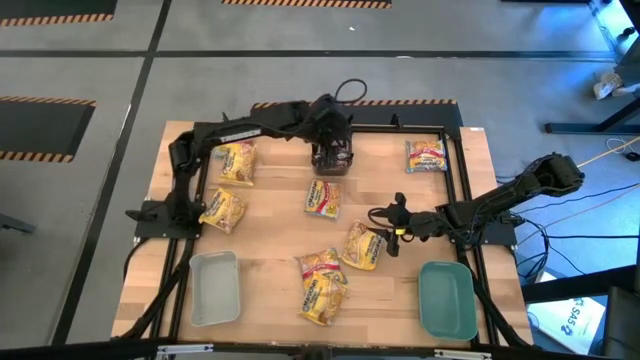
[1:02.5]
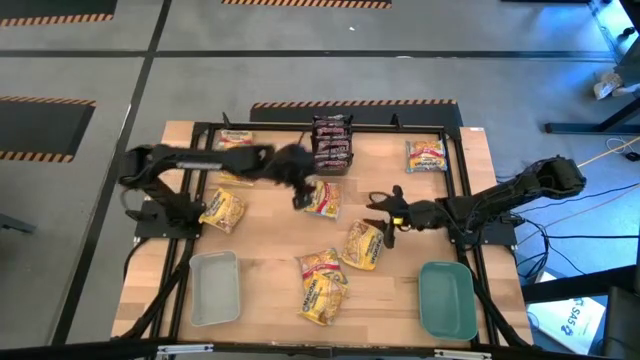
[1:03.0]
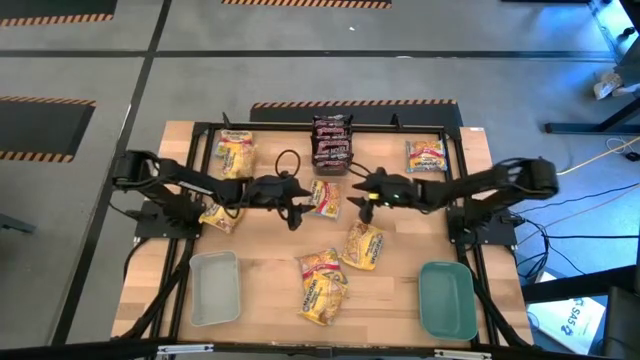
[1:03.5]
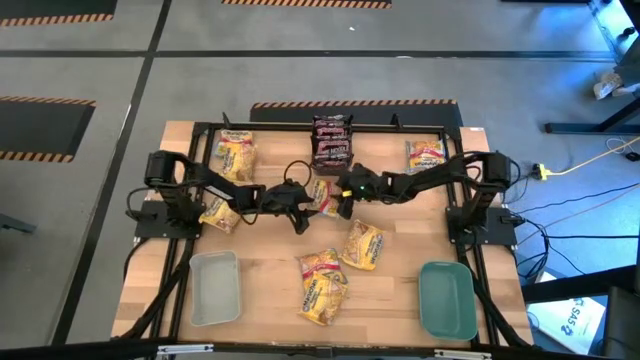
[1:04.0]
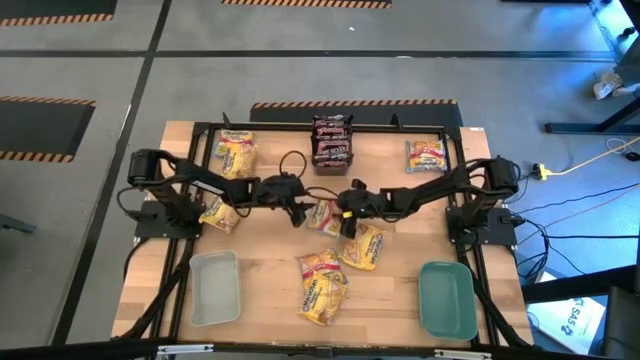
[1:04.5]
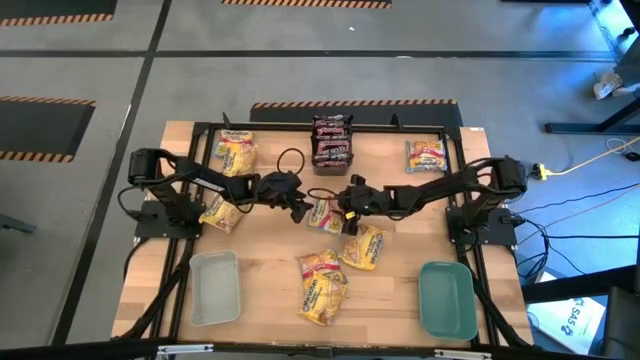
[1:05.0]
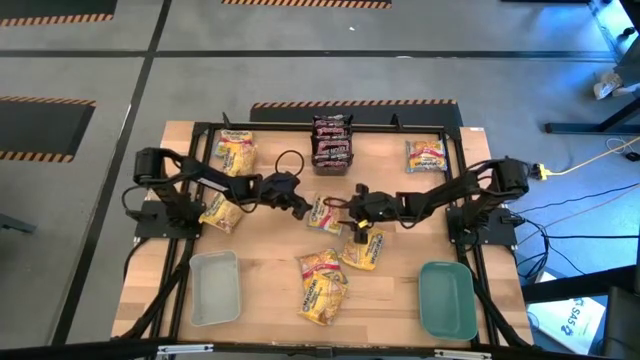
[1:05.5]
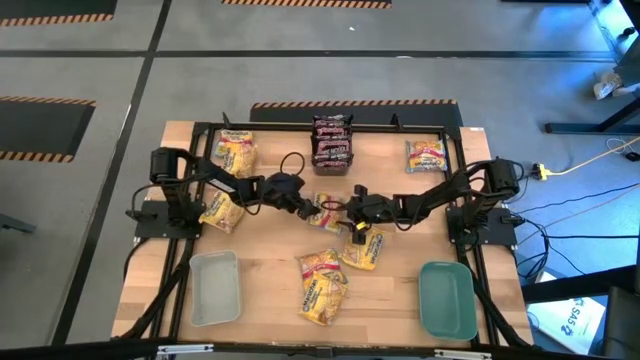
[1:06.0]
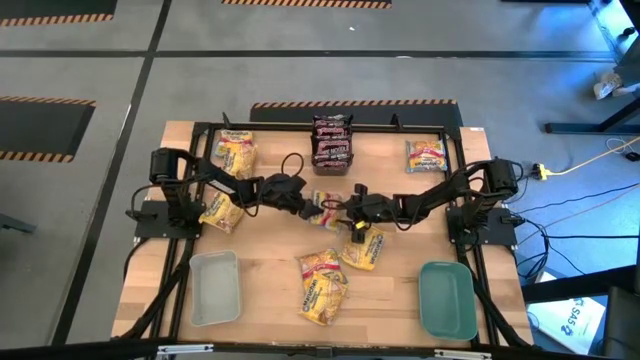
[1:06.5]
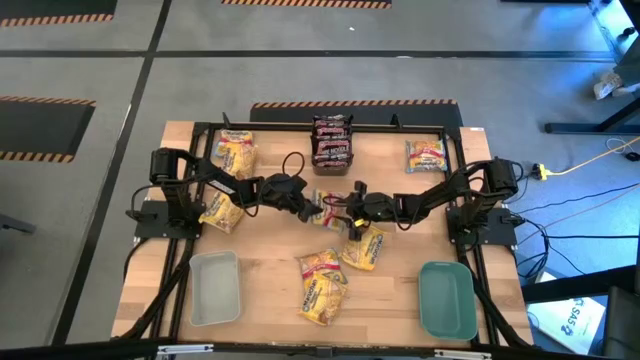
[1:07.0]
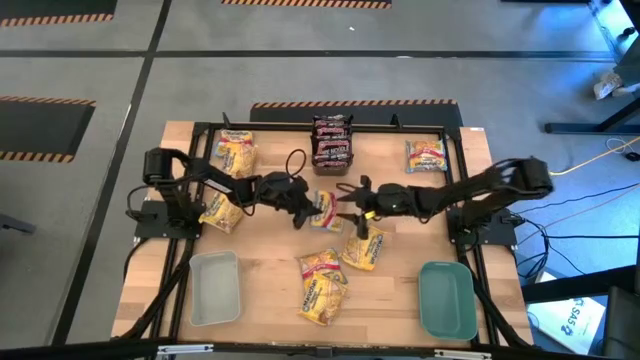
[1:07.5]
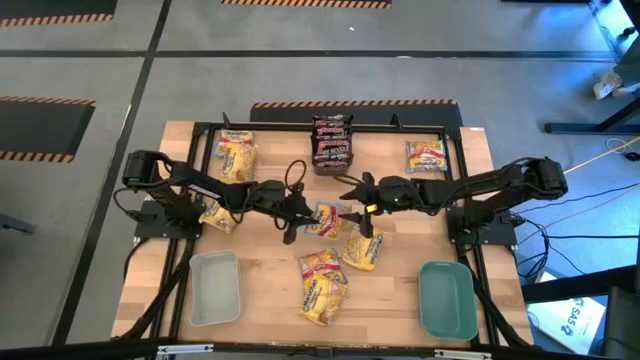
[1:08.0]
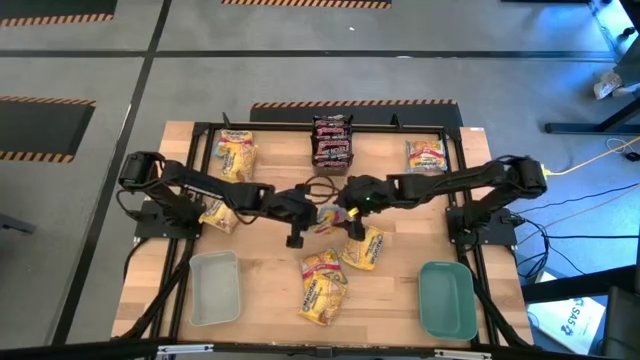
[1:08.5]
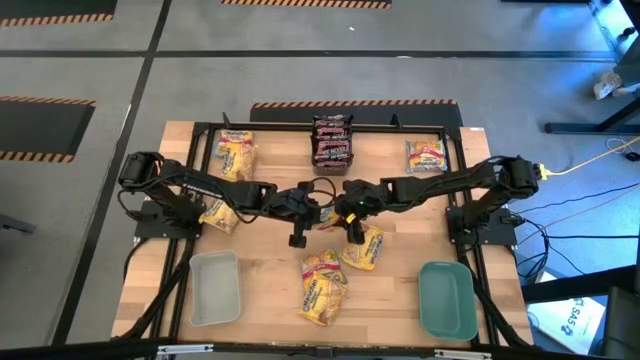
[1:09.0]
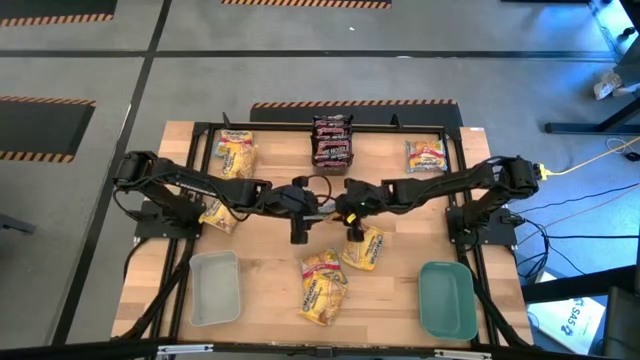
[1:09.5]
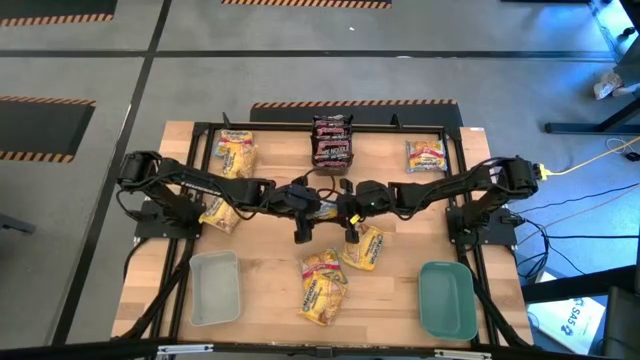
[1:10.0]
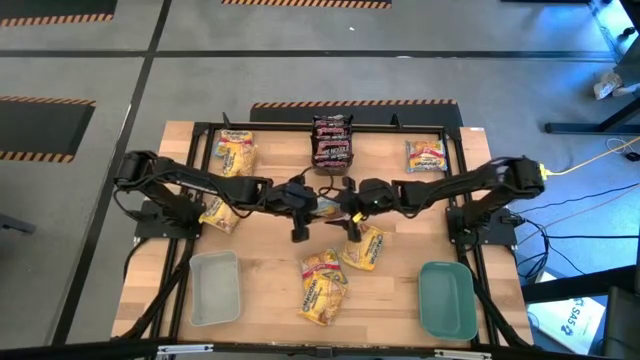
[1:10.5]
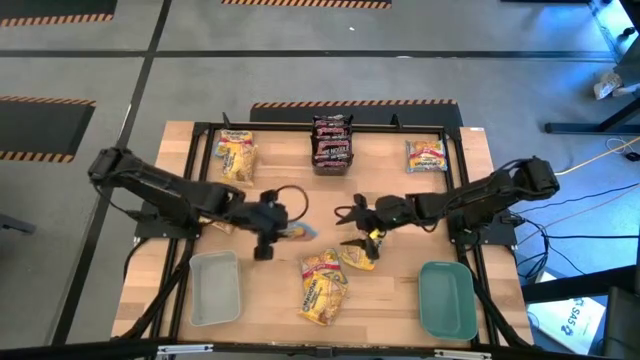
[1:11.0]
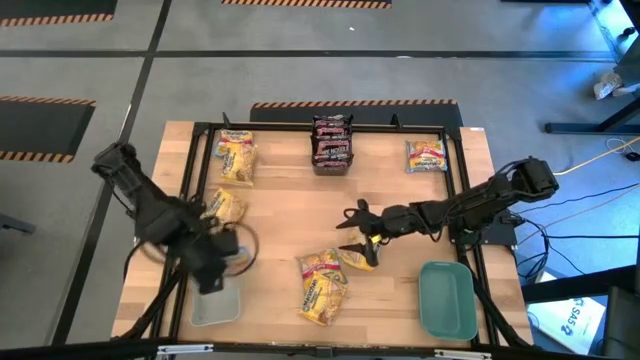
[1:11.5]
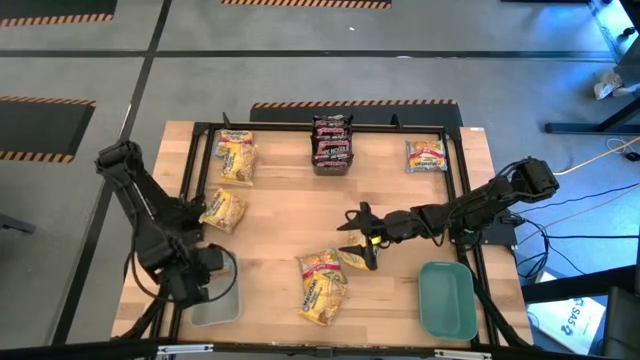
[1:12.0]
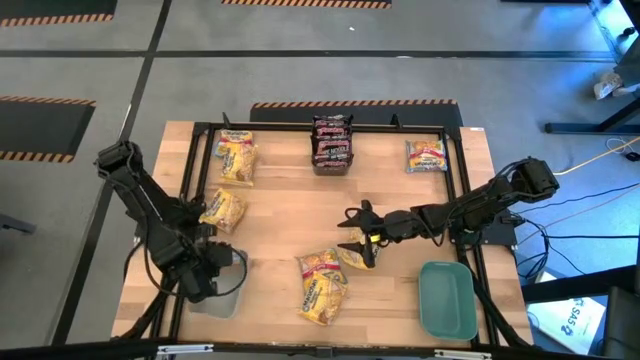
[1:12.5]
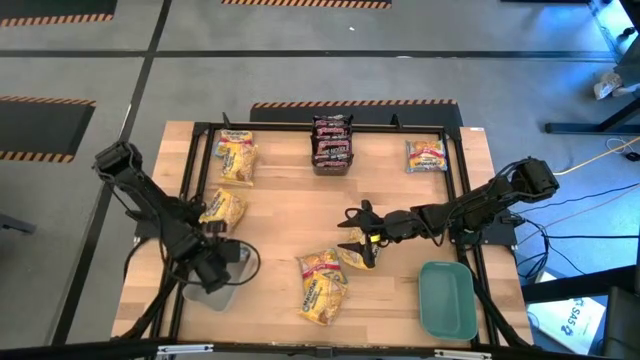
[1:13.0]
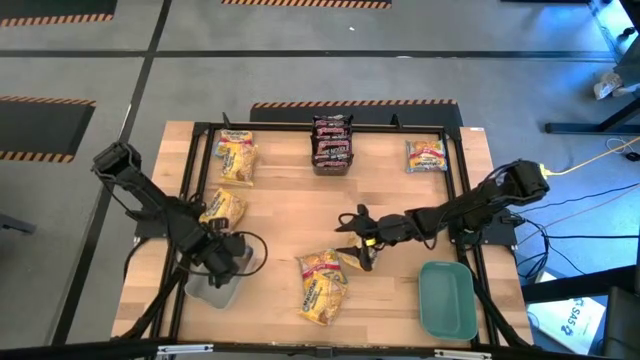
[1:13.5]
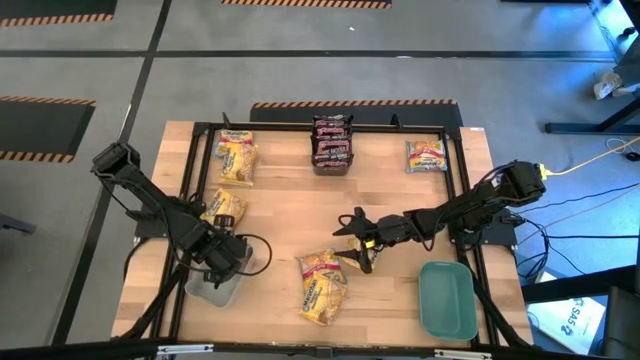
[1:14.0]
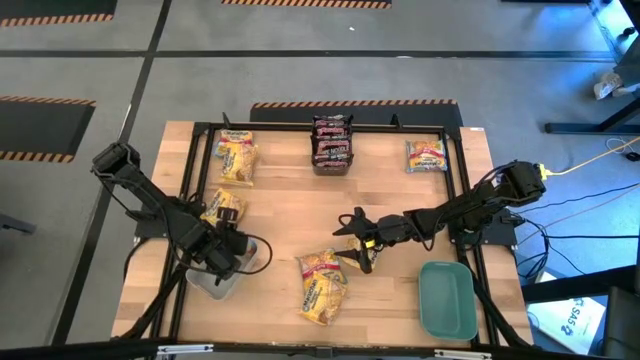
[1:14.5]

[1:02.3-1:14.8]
Task: Sort Maruchan noodles
Put the middle blue noodle pack into the gray bin

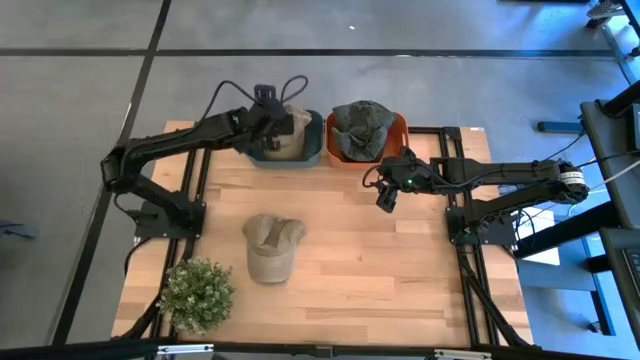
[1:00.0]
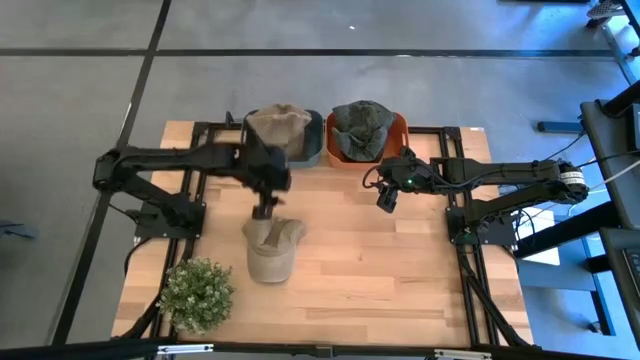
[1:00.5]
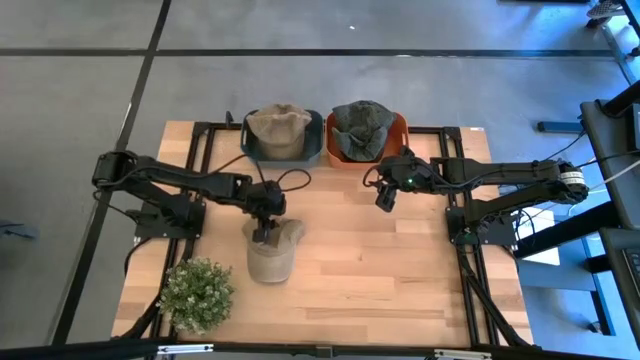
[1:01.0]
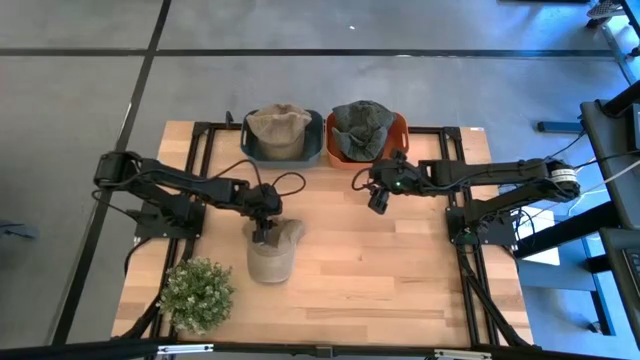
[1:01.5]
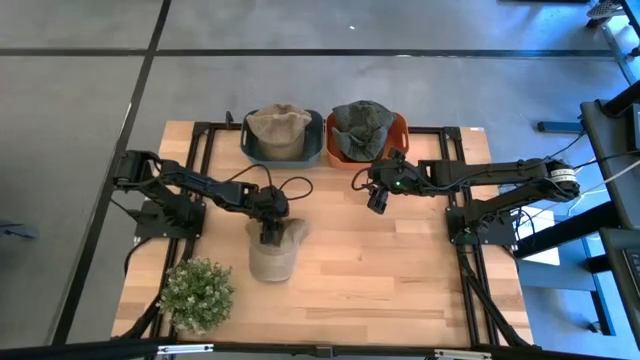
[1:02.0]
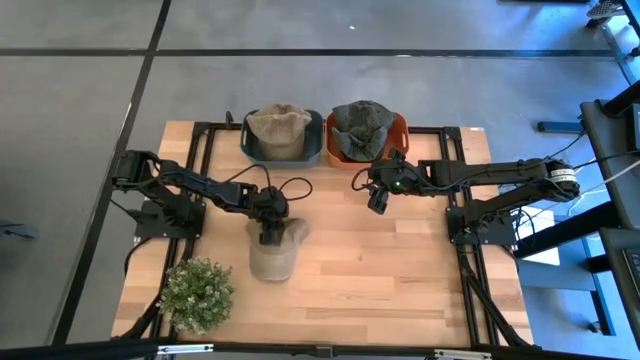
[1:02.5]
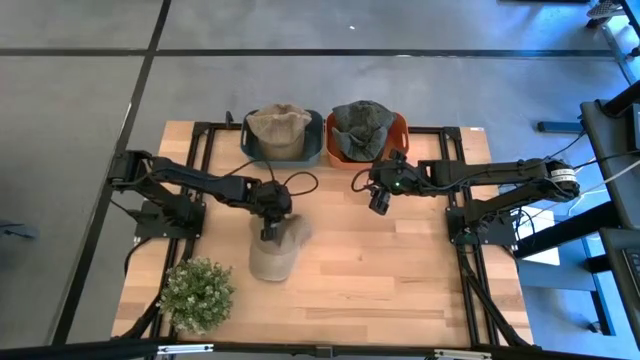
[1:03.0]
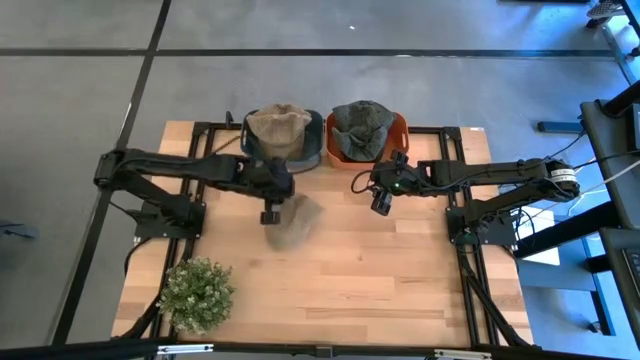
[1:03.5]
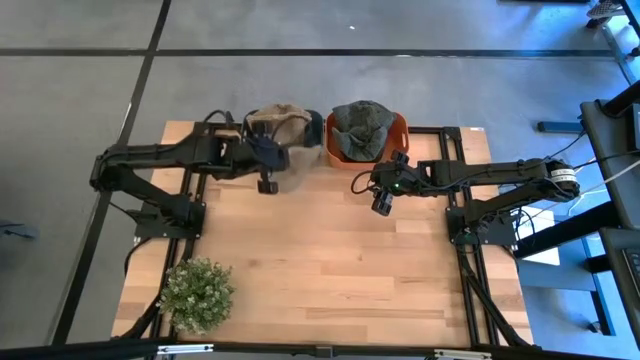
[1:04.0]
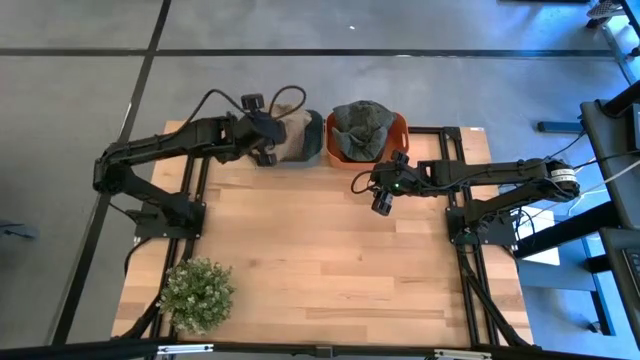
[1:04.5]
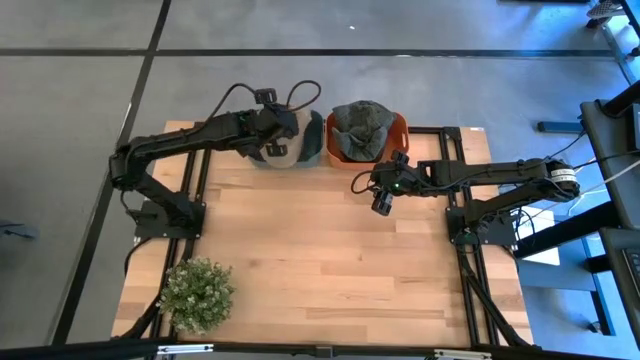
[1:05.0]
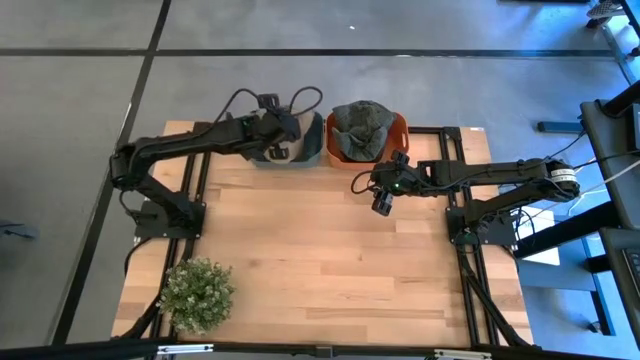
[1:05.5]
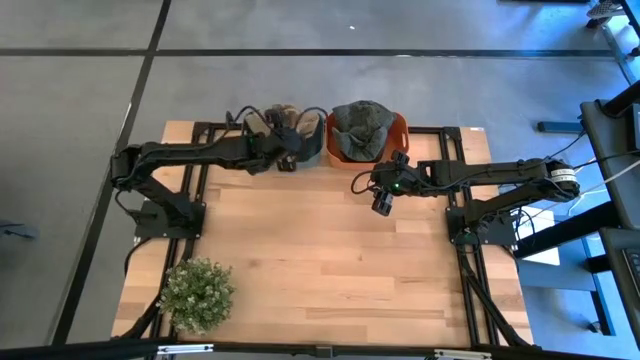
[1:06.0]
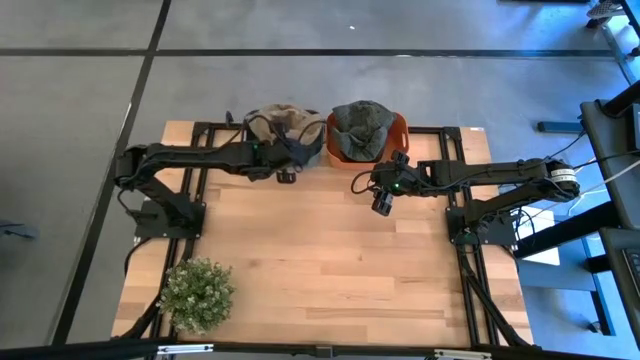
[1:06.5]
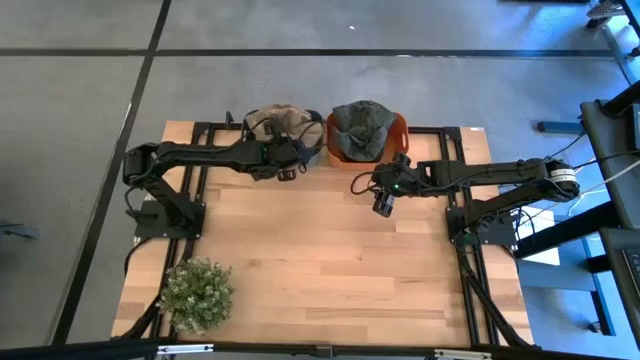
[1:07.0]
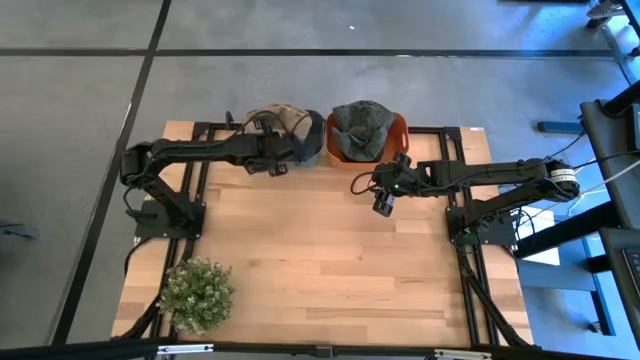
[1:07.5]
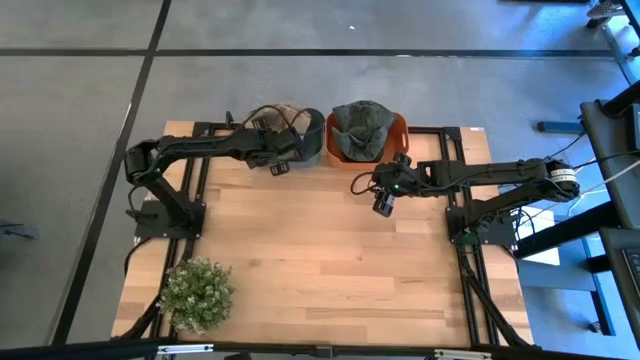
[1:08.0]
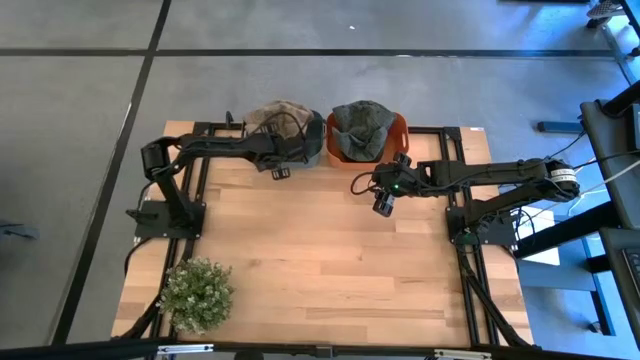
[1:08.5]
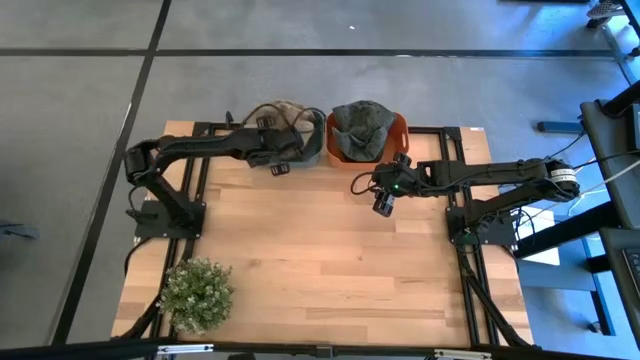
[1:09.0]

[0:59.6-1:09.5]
Task: Pick & Place hat
Put the brown cap into the dark blue bin
